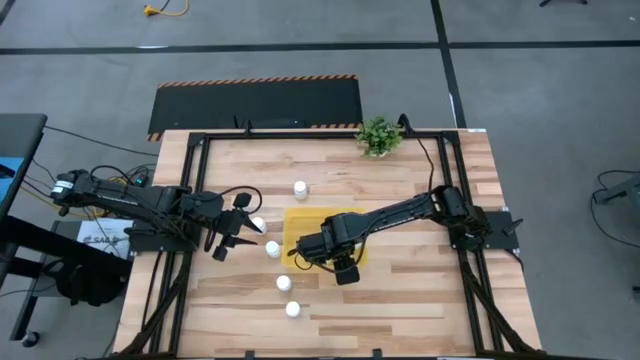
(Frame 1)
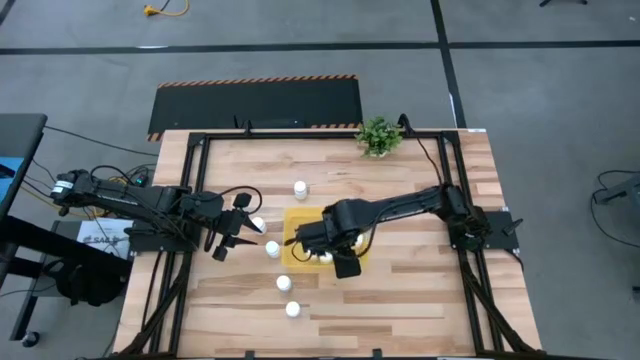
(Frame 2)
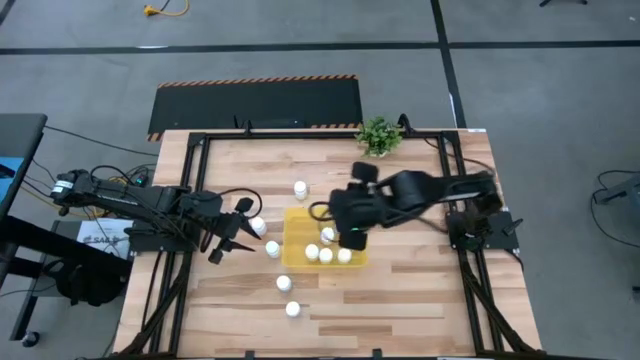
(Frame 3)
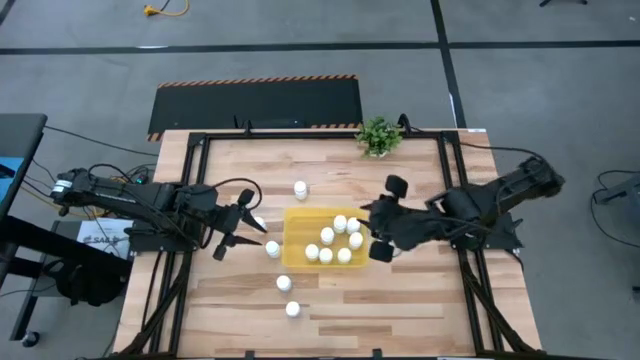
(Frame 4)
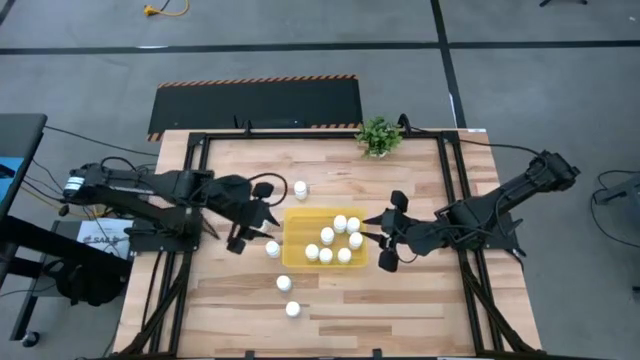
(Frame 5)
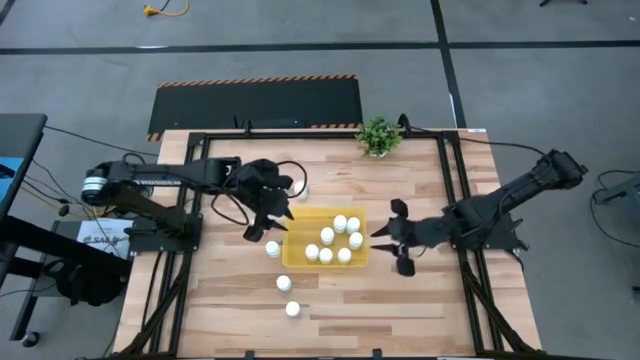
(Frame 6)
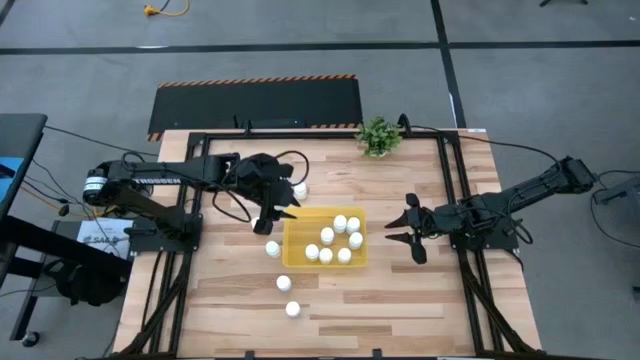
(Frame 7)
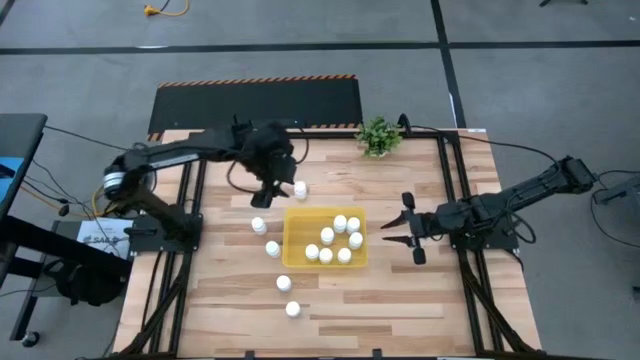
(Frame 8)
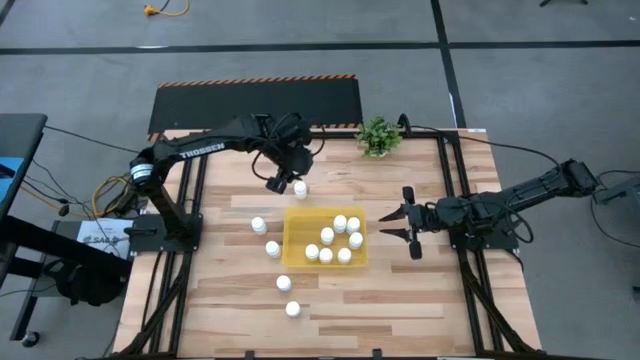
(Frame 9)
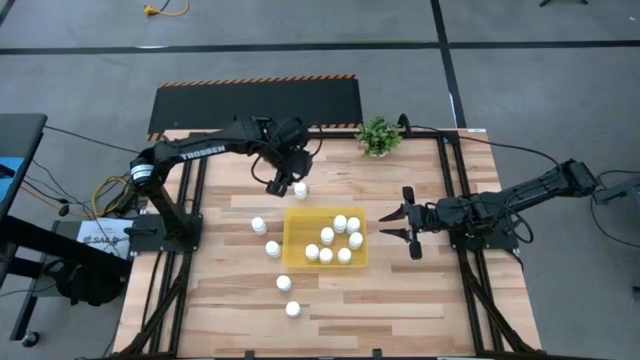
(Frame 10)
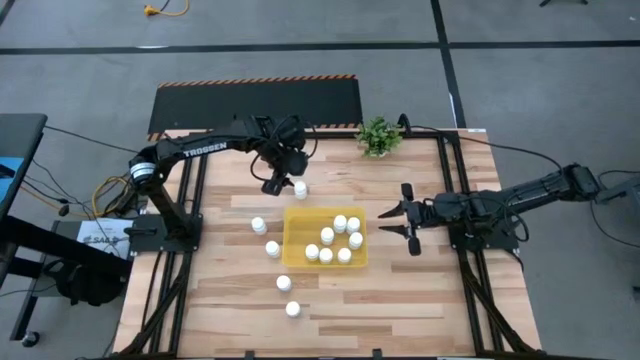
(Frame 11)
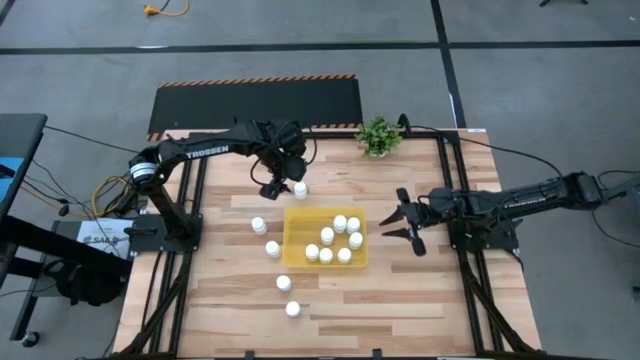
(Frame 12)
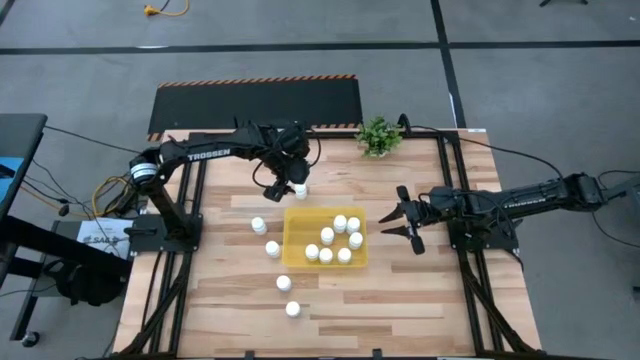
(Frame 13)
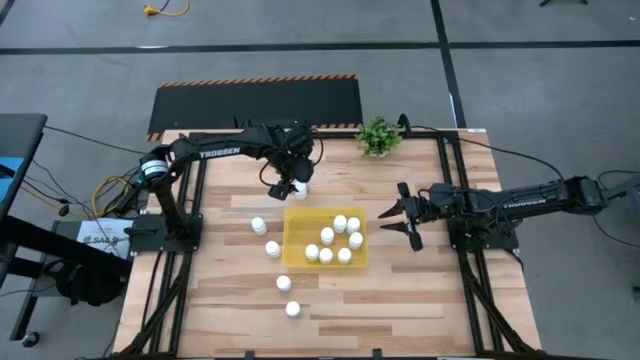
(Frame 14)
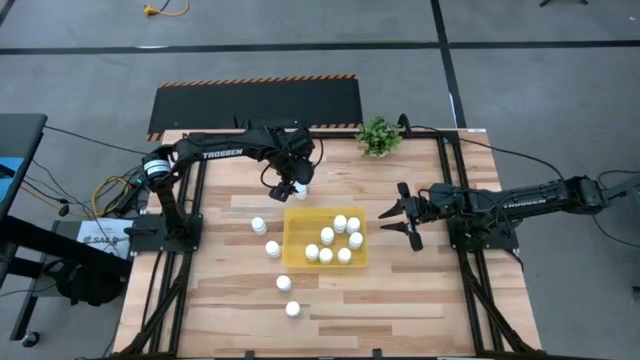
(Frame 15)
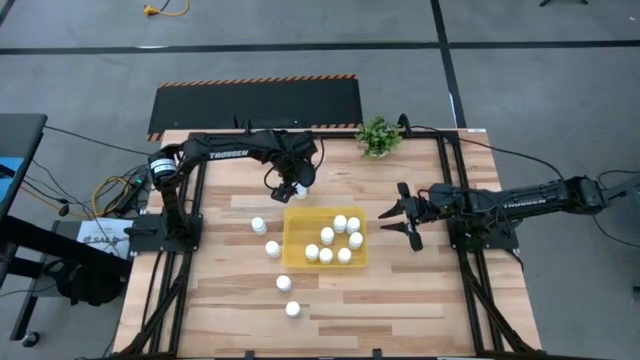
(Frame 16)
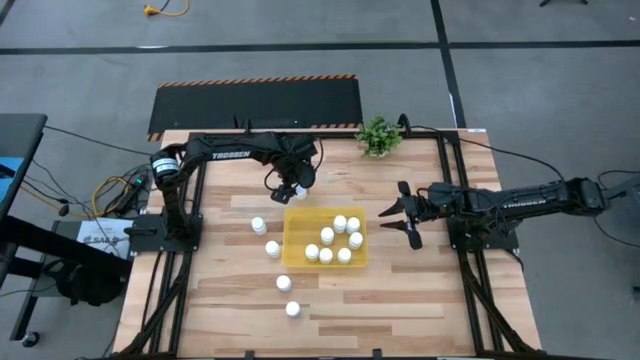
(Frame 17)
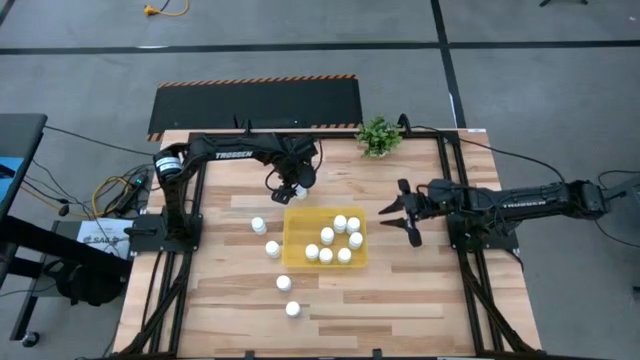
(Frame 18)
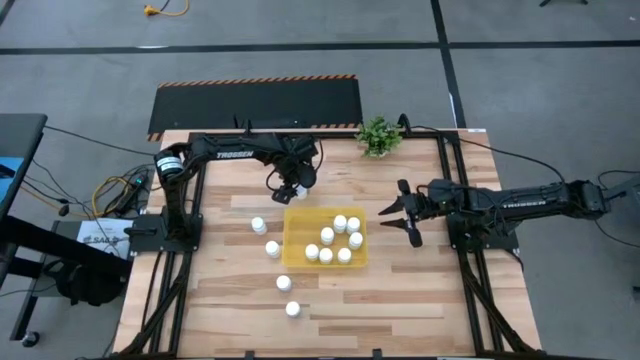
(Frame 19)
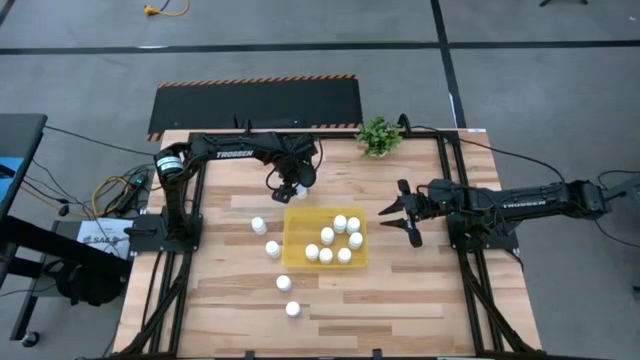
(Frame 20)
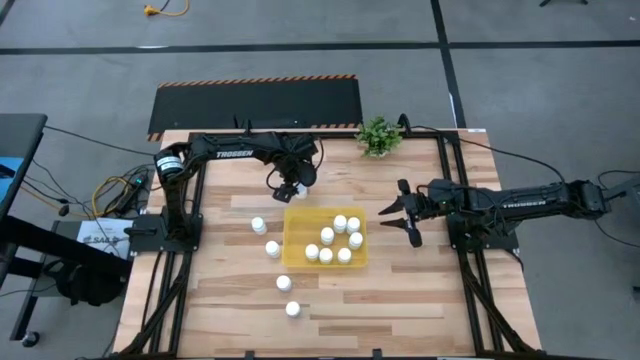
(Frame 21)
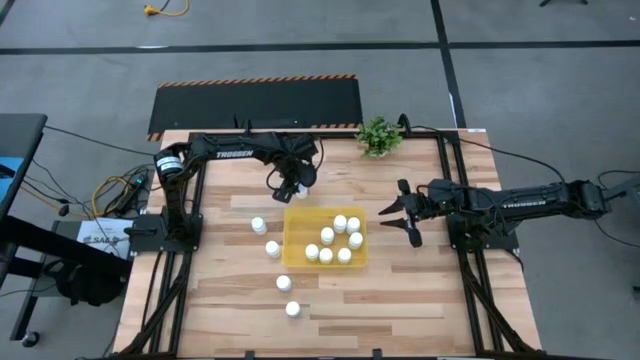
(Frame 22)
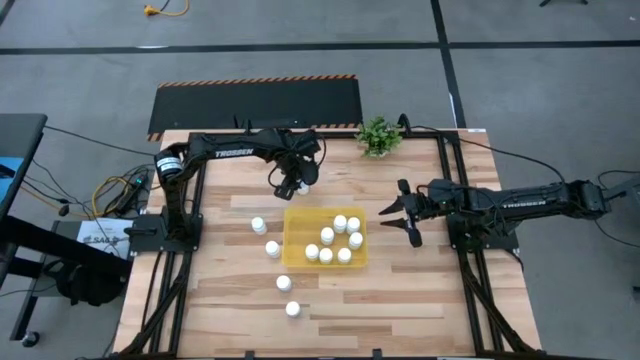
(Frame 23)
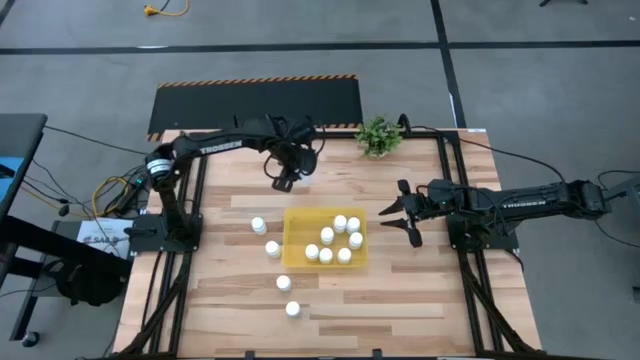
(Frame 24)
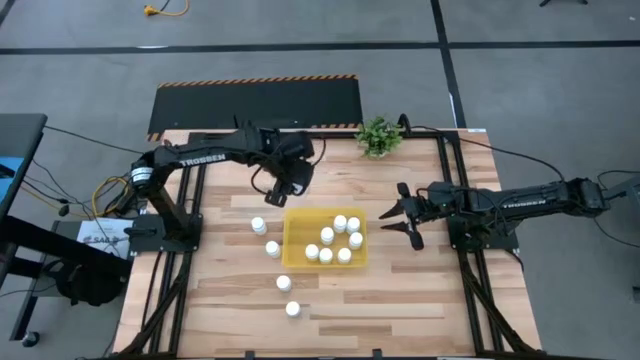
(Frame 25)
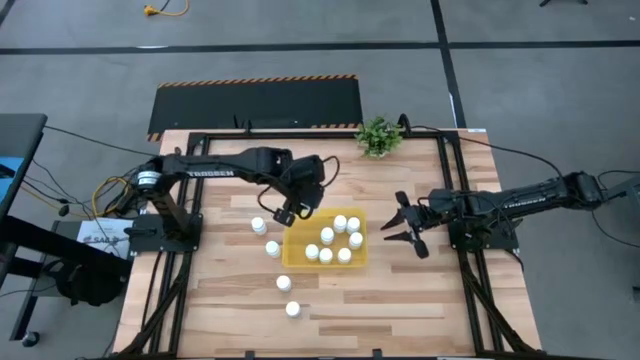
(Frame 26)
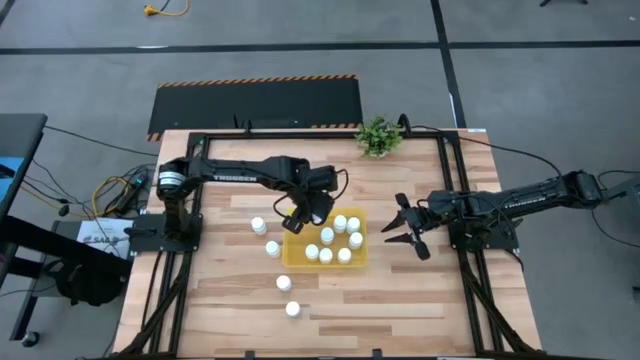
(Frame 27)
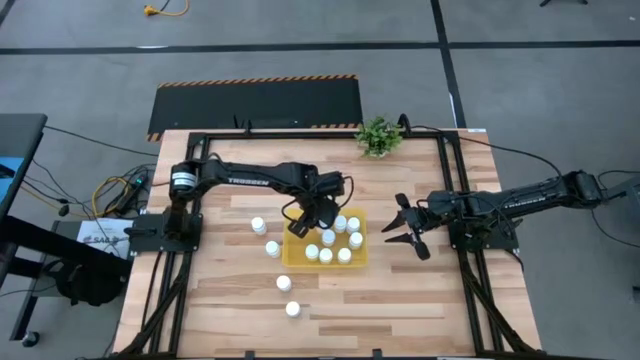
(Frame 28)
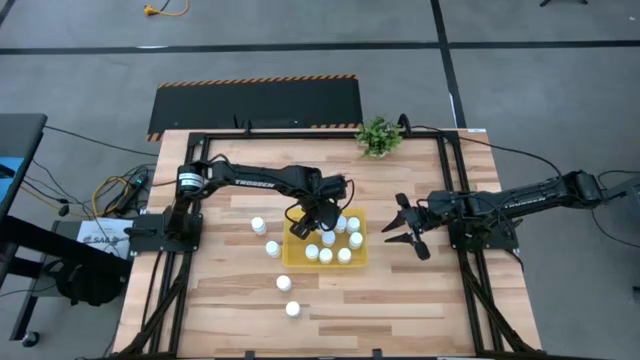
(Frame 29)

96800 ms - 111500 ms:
Task: Pick and place pill bottles into a basket
Put the white pill bottle into the yellow bin

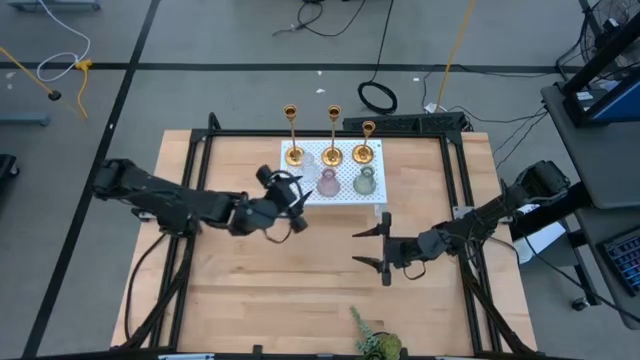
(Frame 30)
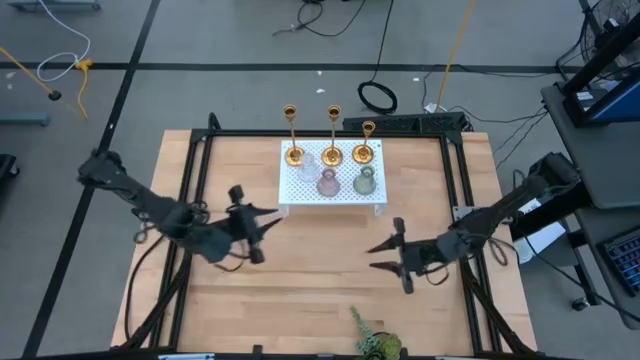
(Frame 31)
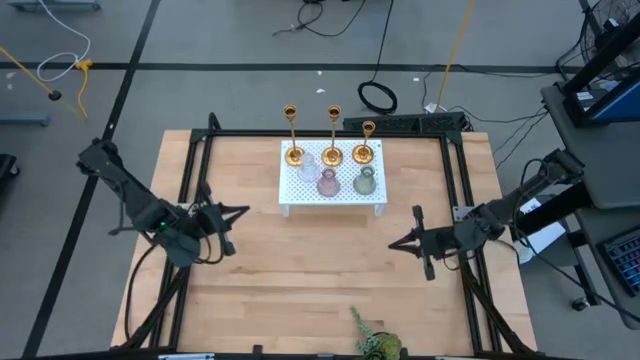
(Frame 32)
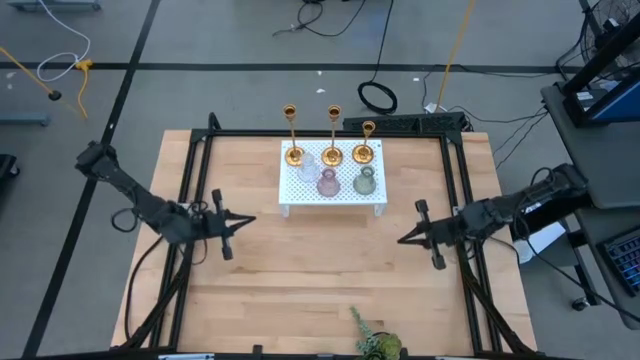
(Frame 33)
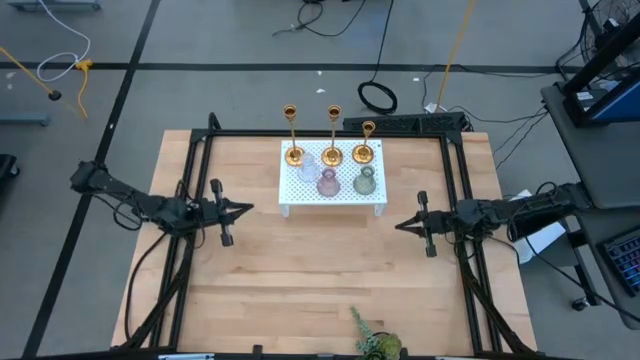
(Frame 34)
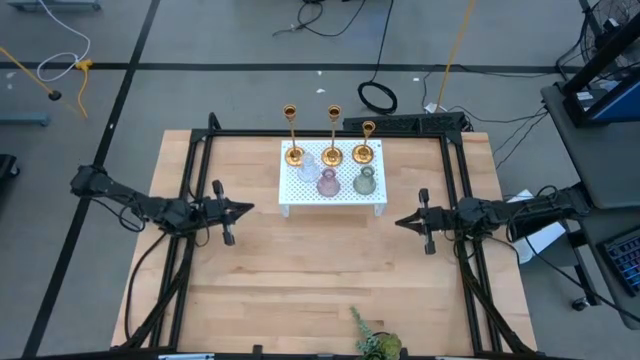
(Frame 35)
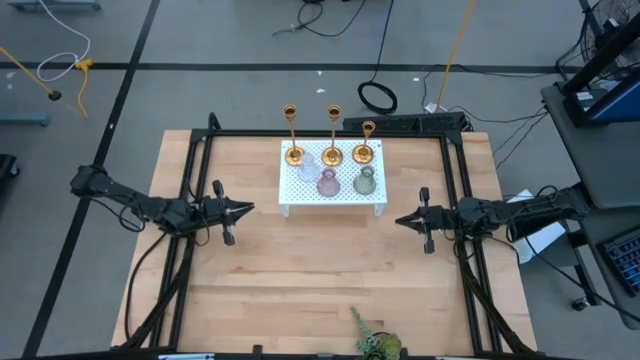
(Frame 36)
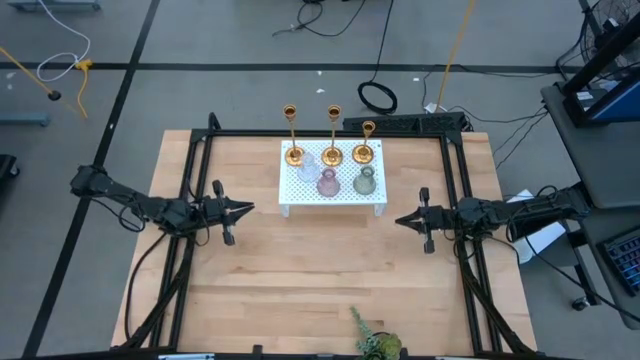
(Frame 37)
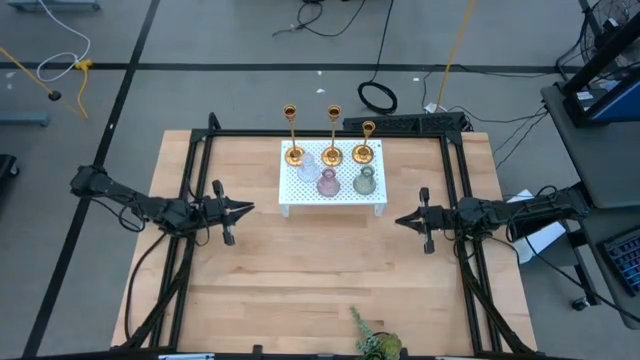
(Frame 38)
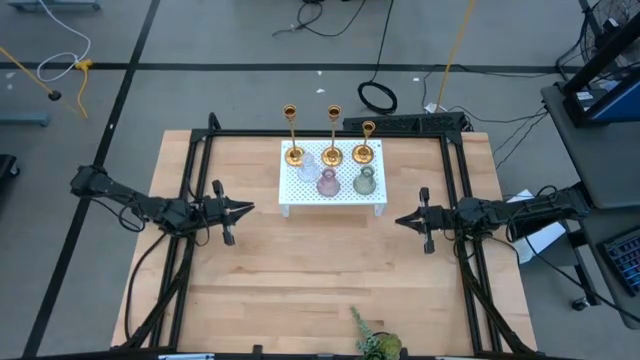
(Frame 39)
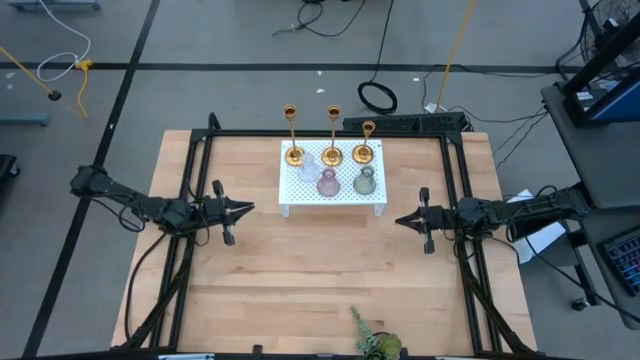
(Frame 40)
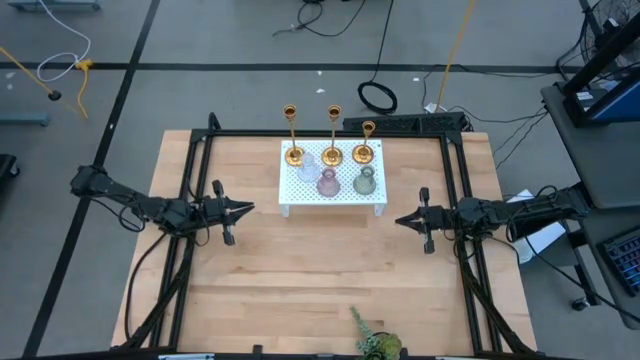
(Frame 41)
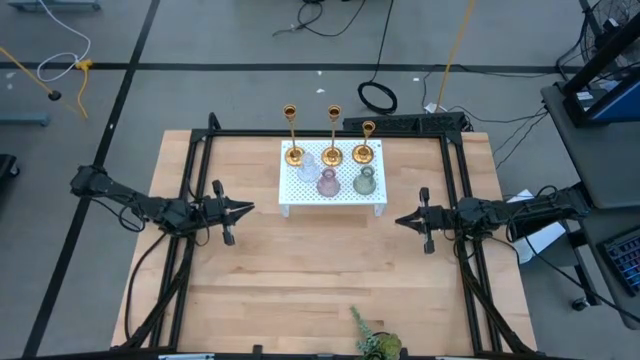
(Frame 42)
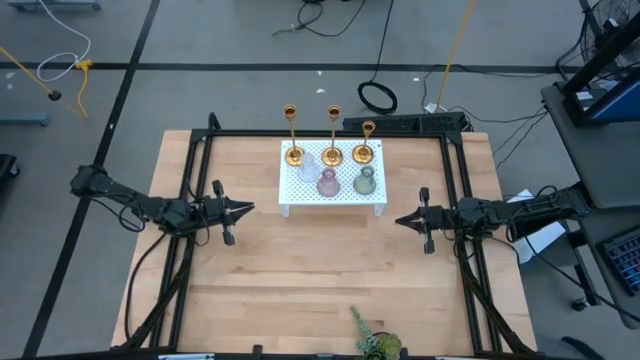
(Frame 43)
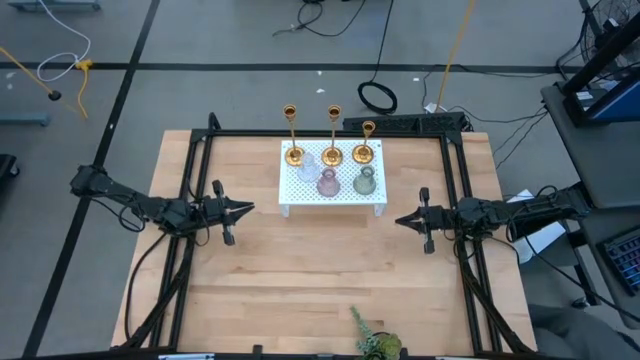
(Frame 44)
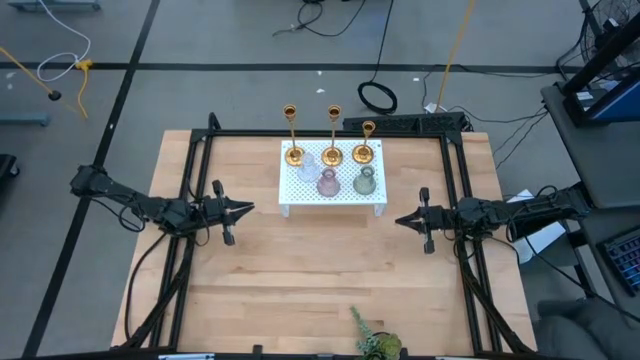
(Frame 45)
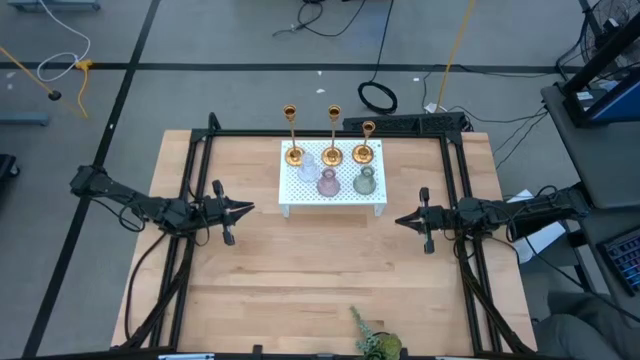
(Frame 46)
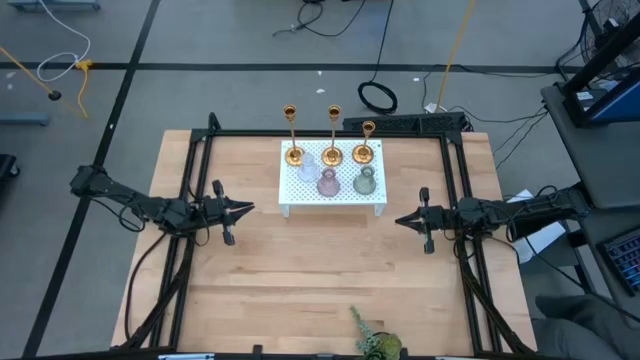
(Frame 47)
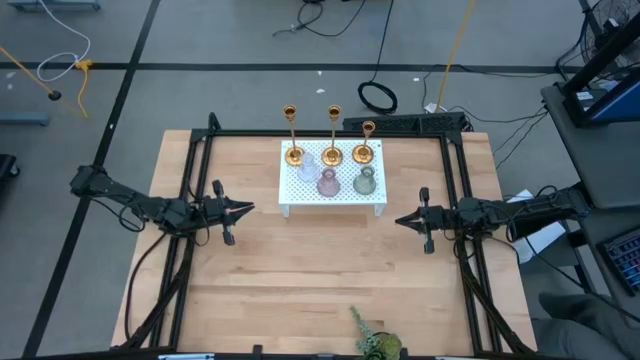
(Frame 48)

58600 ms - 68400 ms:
Task: Pick & Place candle stick holders
Return to Home Position
